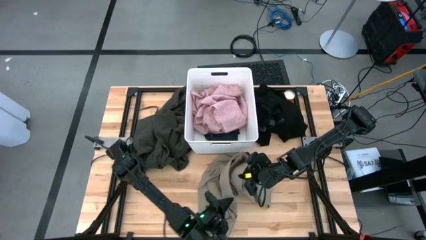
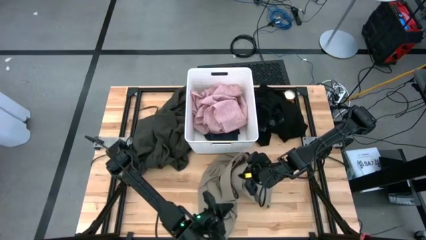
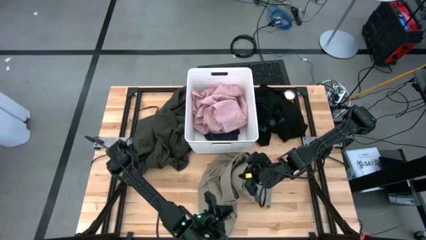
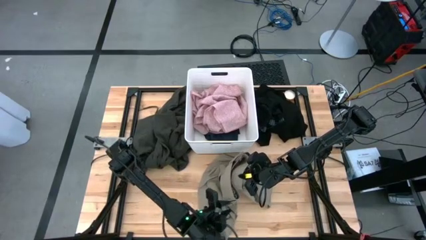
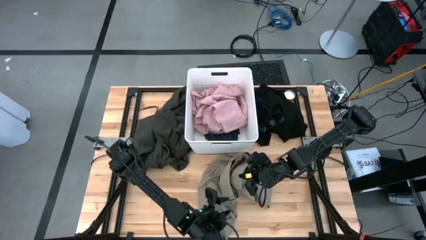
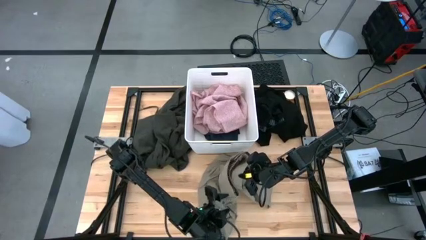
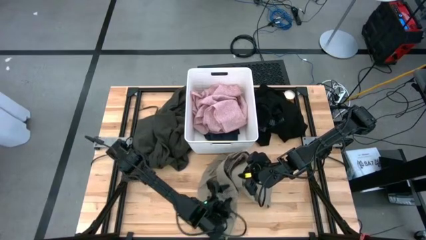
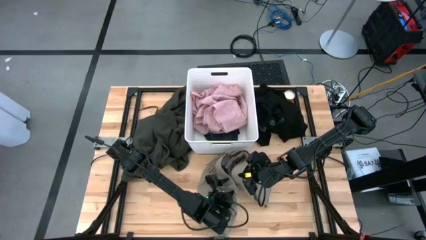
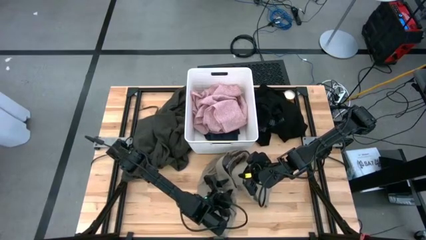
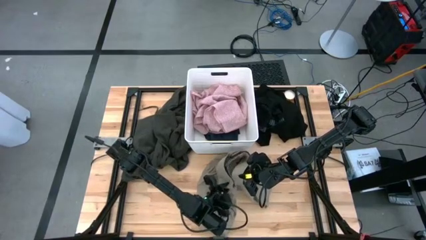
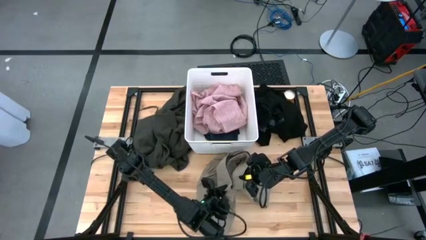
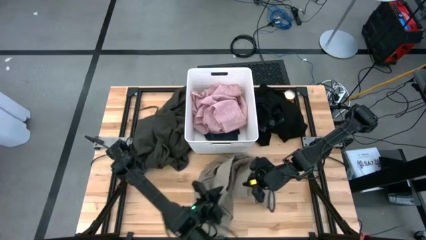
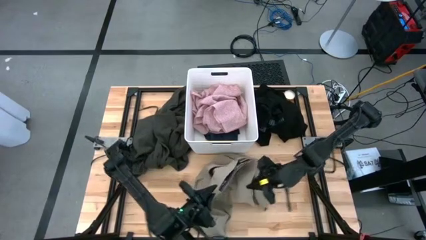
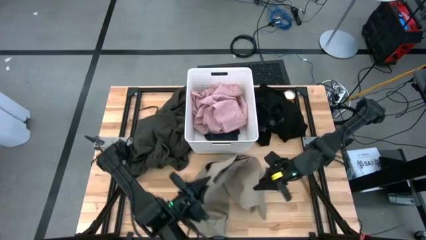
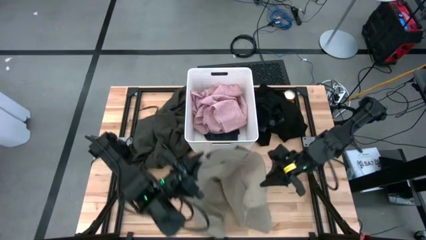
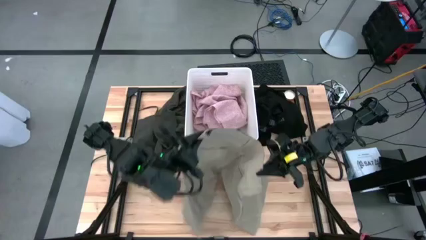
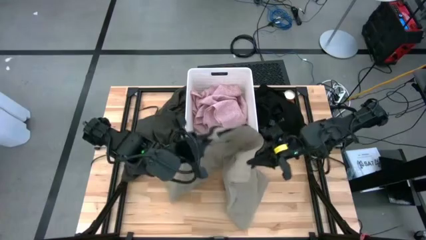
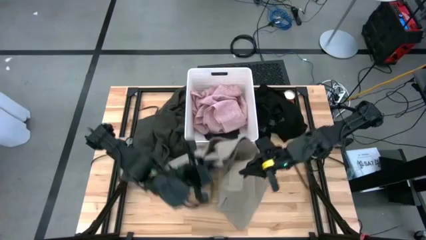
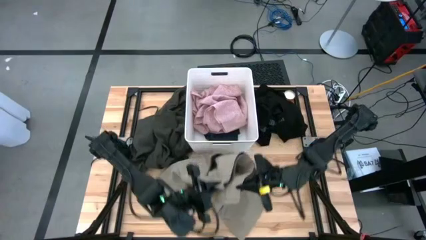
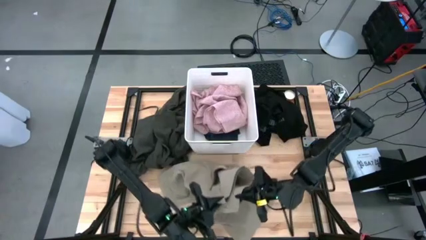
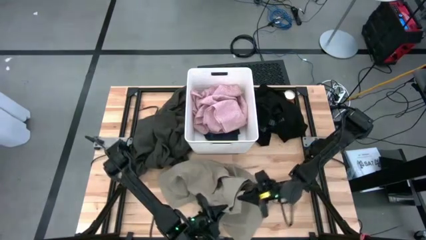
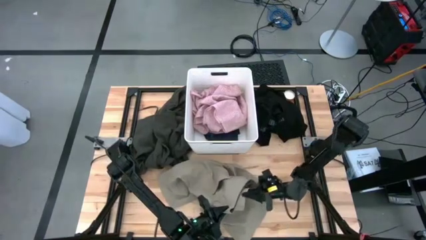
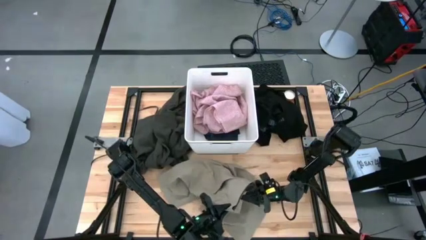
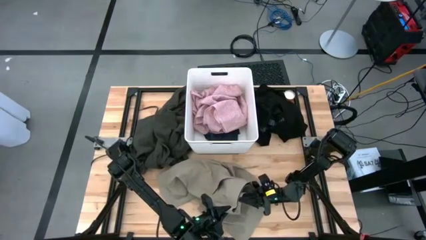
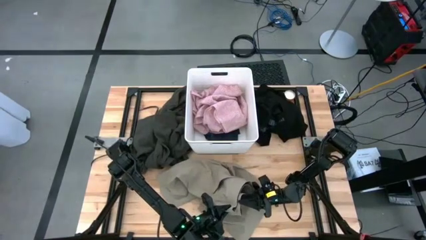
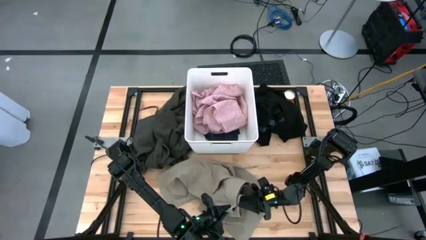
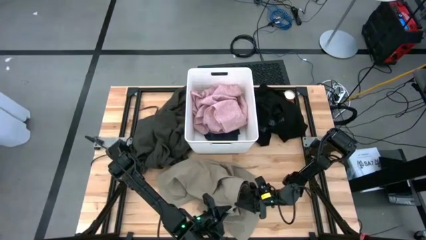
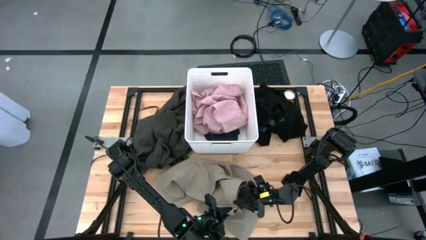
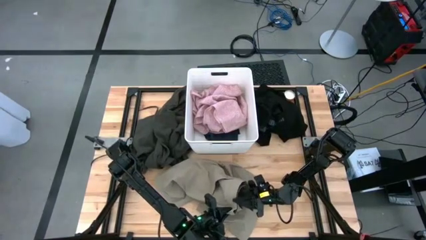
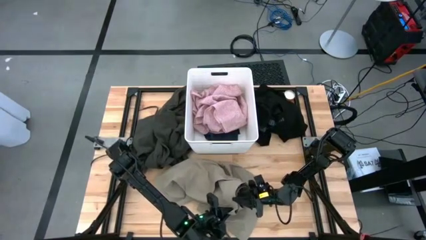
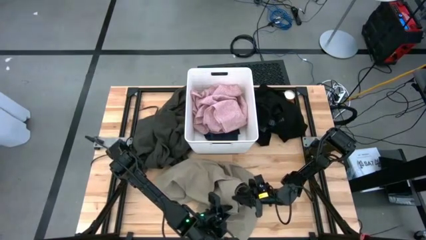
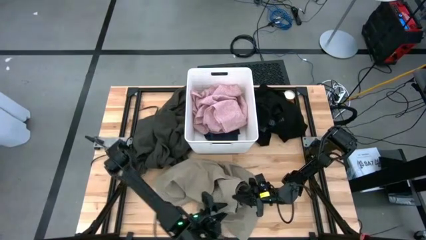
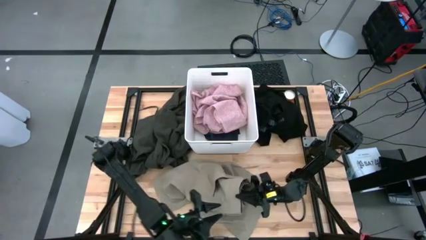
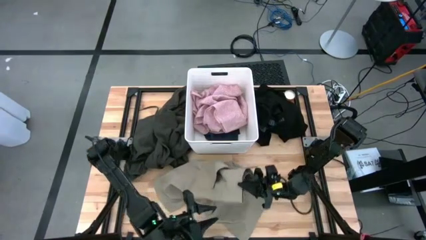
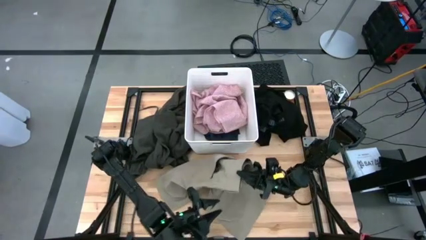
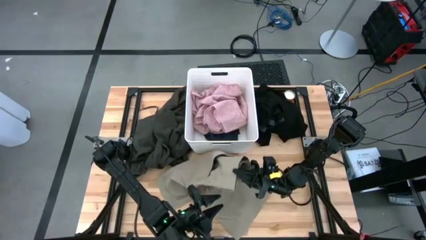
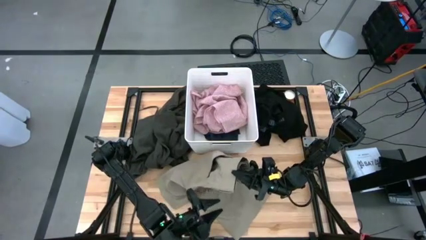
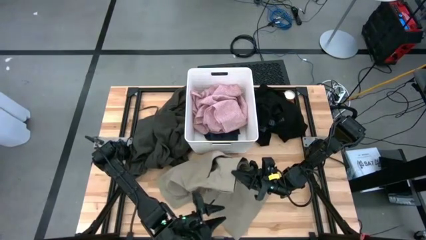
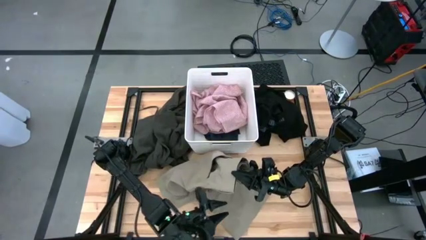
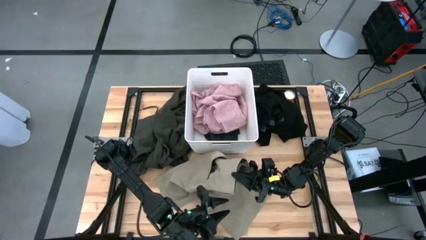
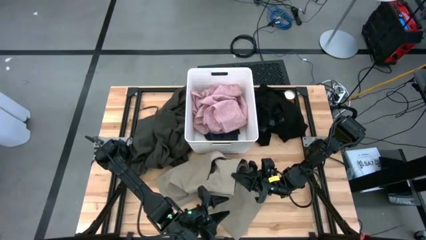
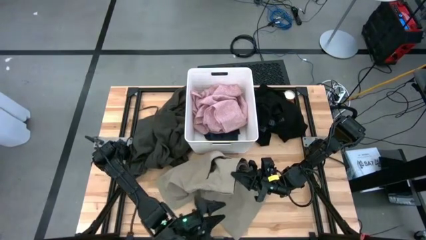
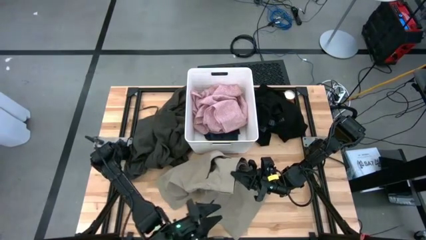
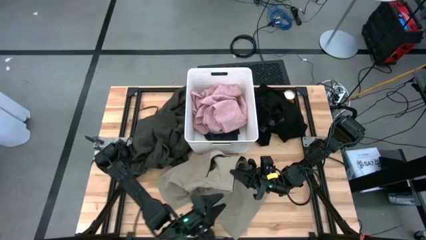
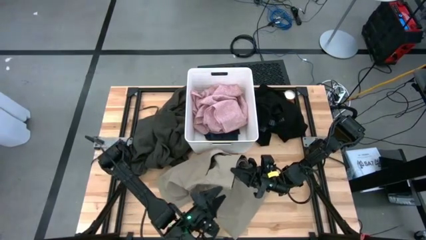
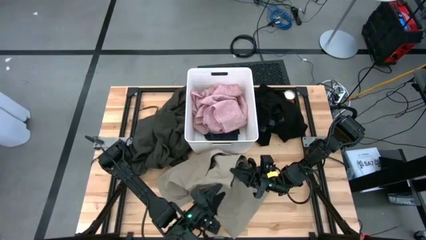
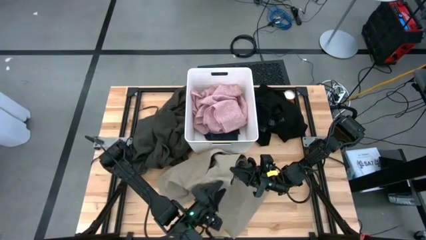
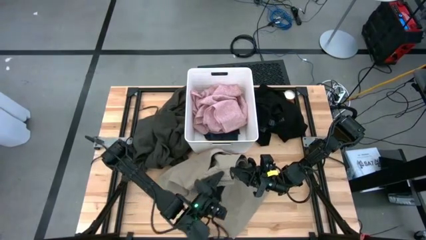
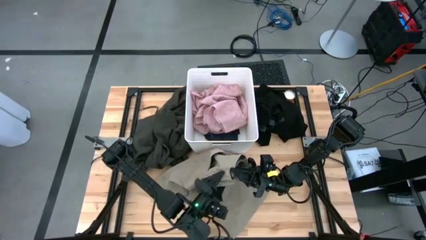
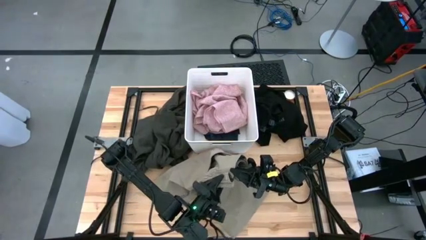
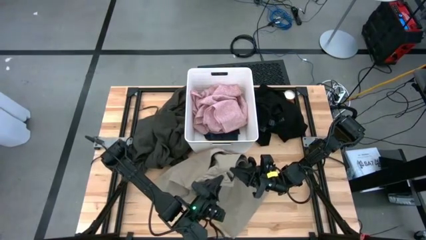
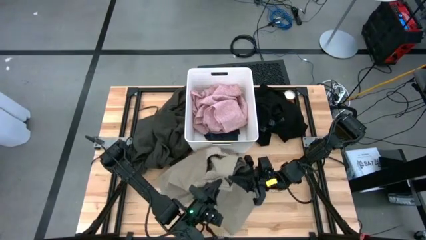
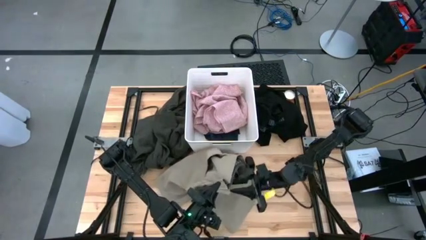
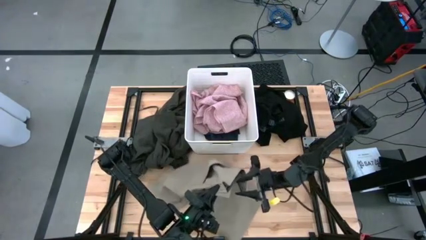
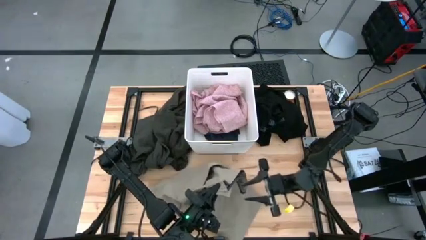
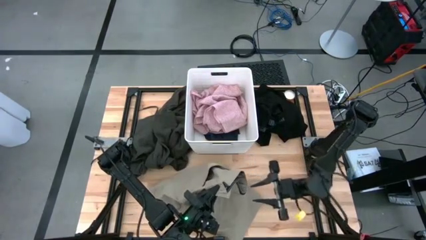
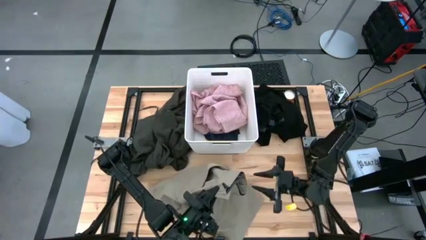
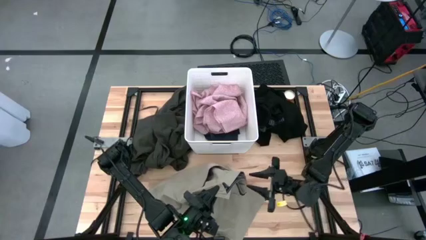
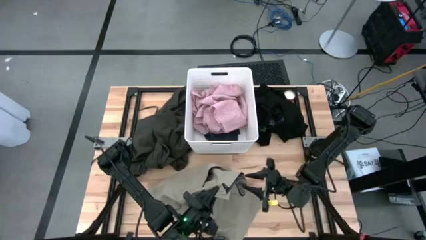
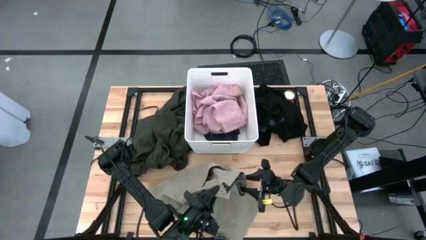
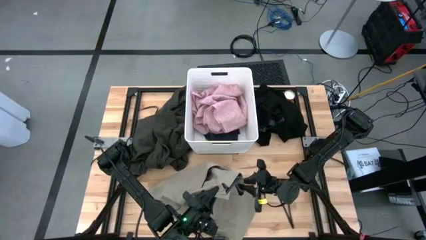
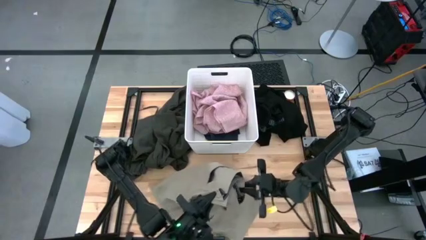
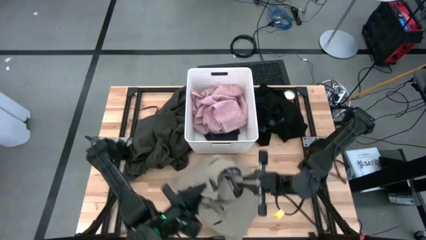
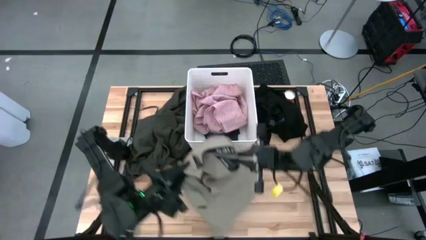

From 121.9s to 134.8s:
Task: Sort clothes
Put the brown shorts into the white laundry bin
